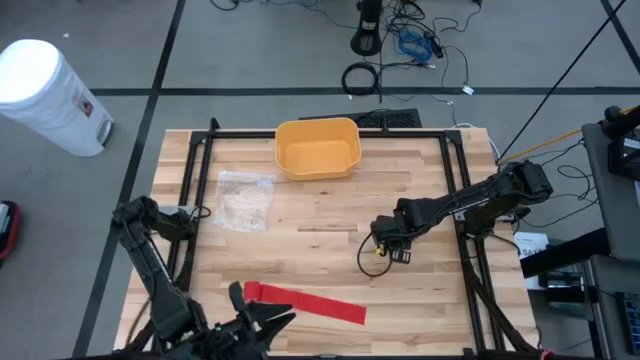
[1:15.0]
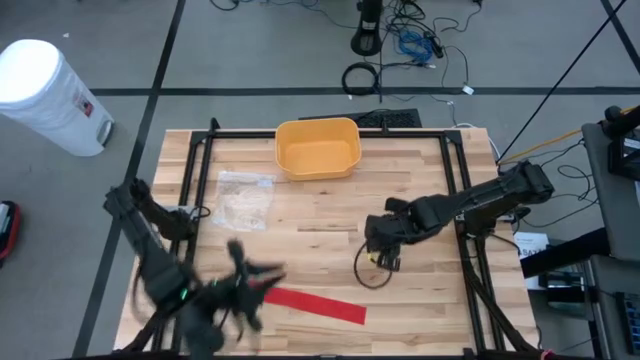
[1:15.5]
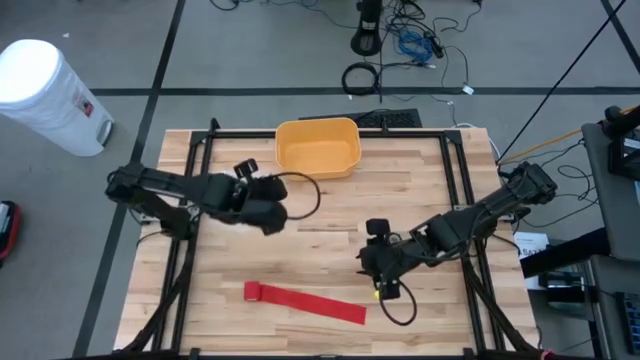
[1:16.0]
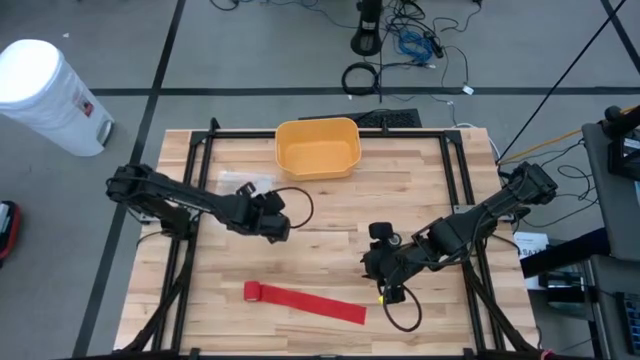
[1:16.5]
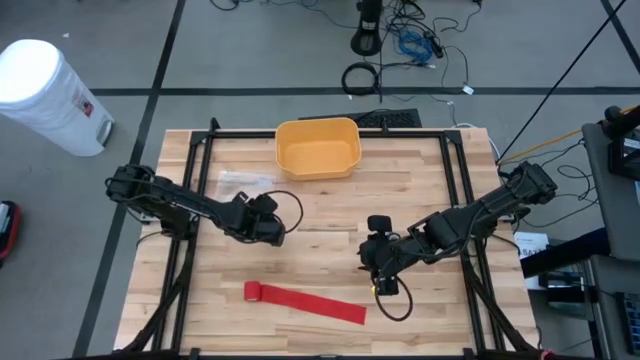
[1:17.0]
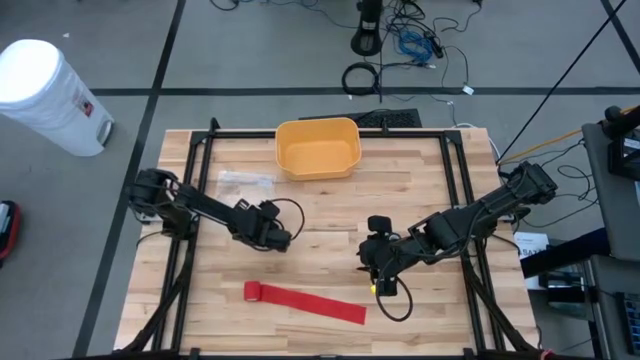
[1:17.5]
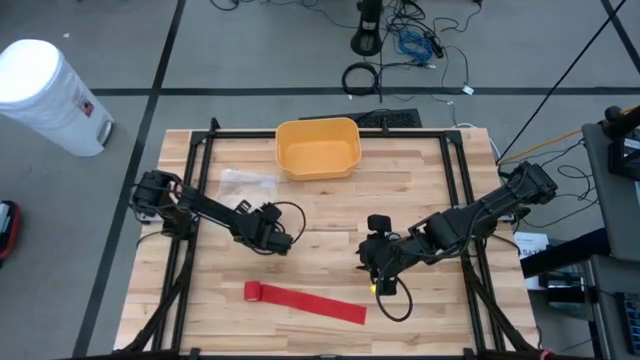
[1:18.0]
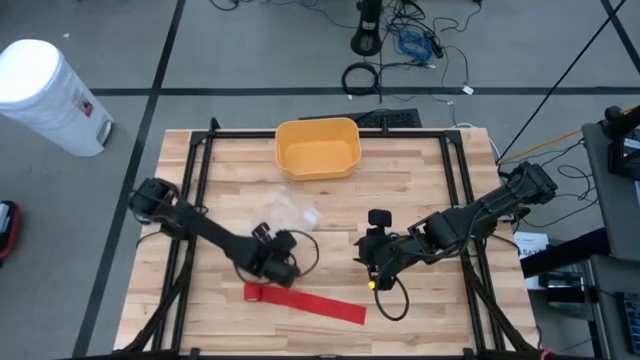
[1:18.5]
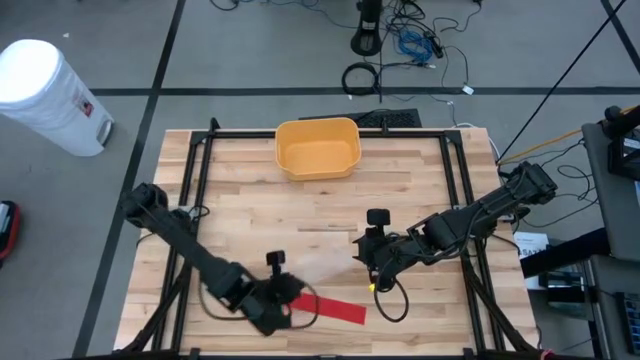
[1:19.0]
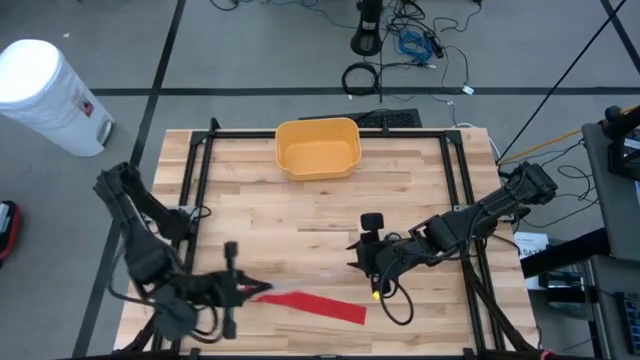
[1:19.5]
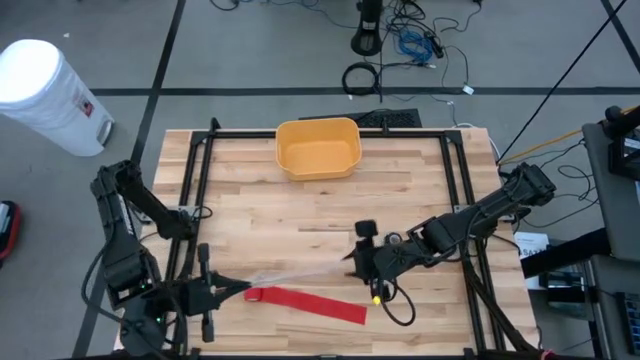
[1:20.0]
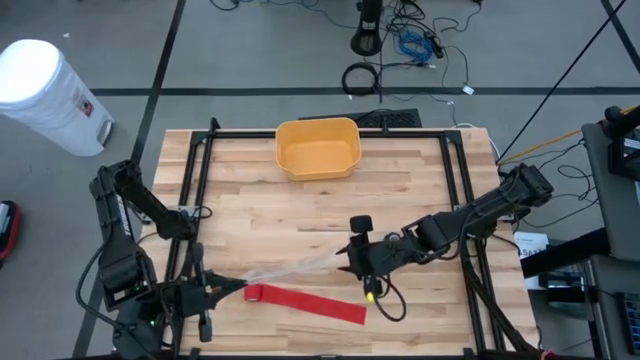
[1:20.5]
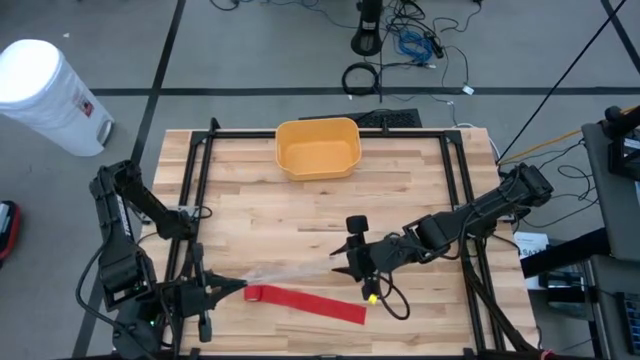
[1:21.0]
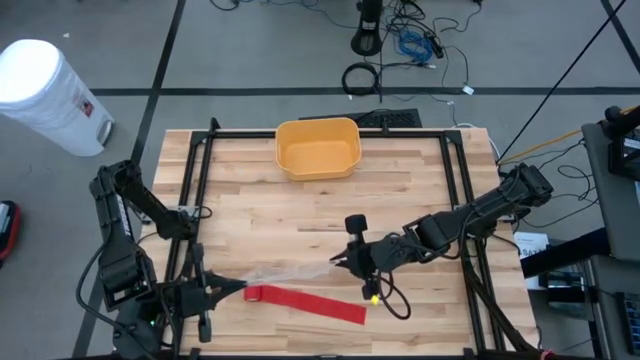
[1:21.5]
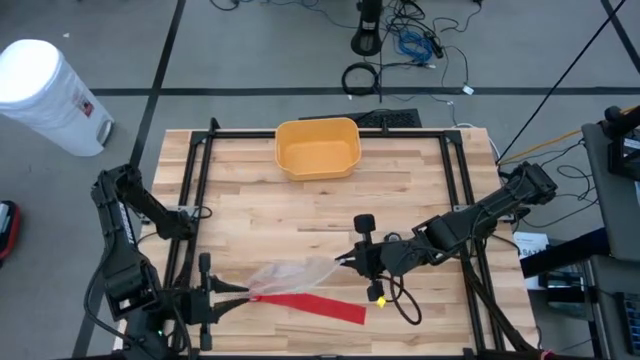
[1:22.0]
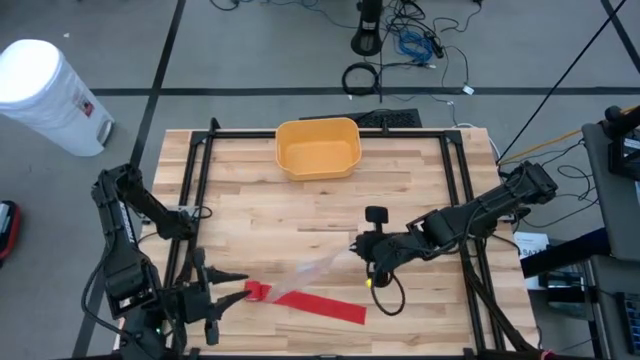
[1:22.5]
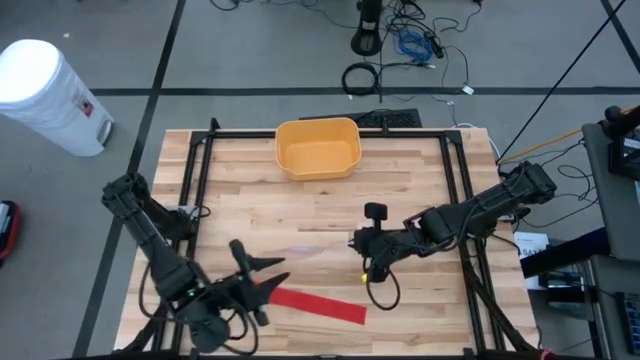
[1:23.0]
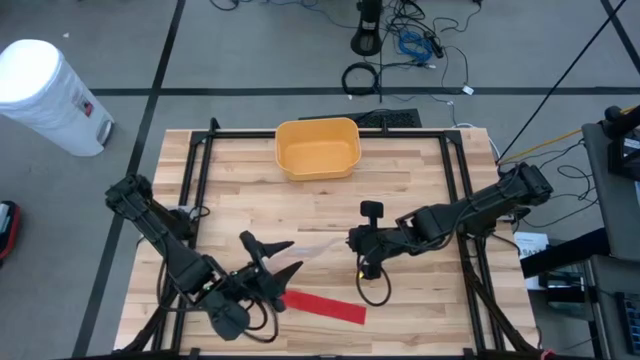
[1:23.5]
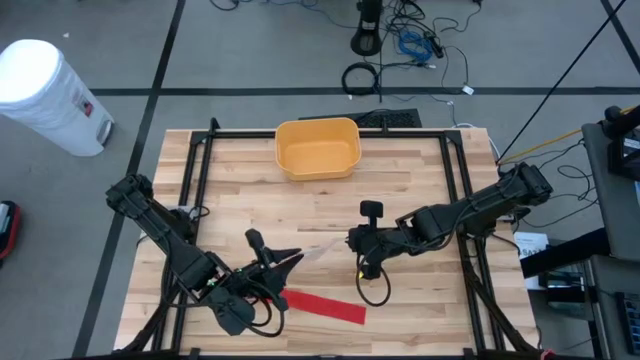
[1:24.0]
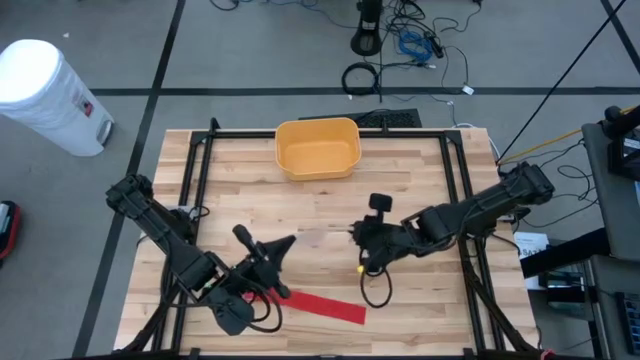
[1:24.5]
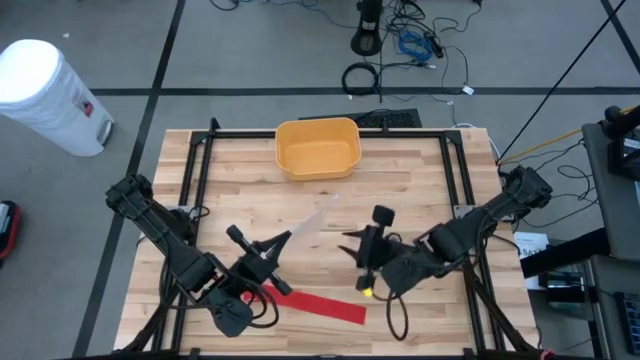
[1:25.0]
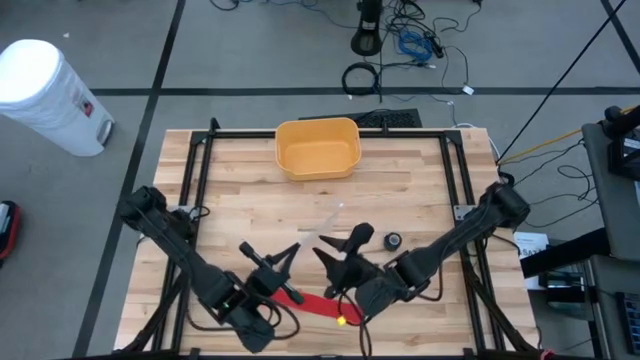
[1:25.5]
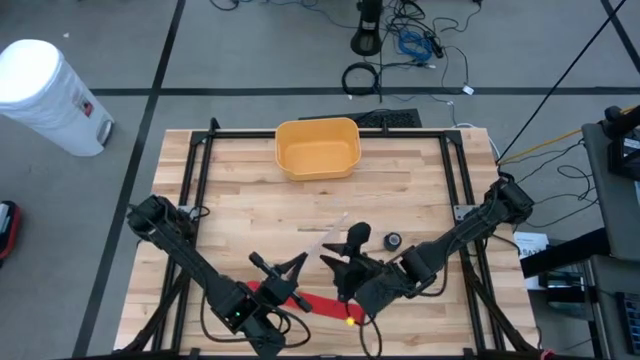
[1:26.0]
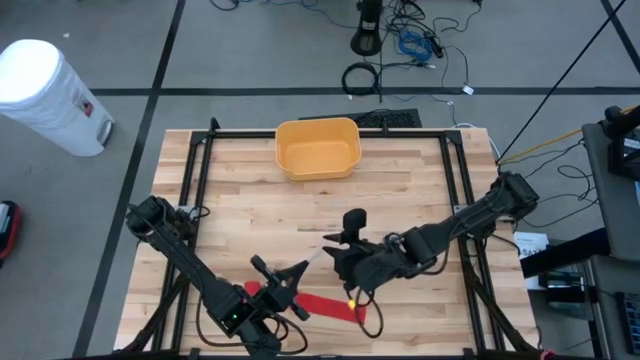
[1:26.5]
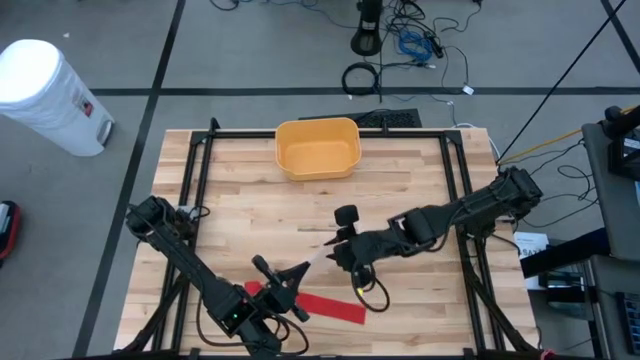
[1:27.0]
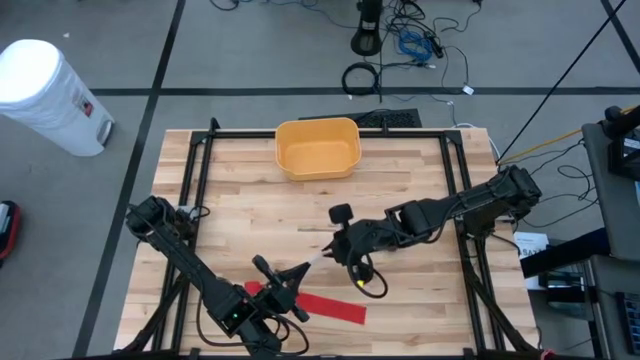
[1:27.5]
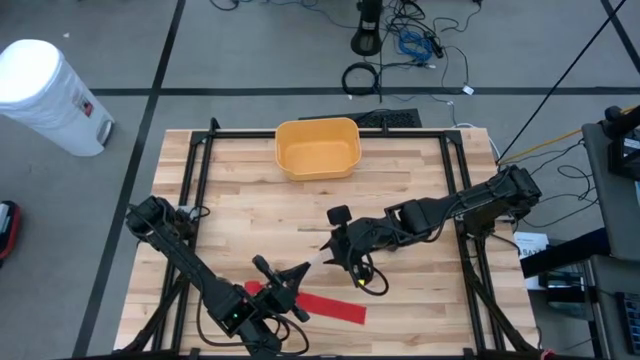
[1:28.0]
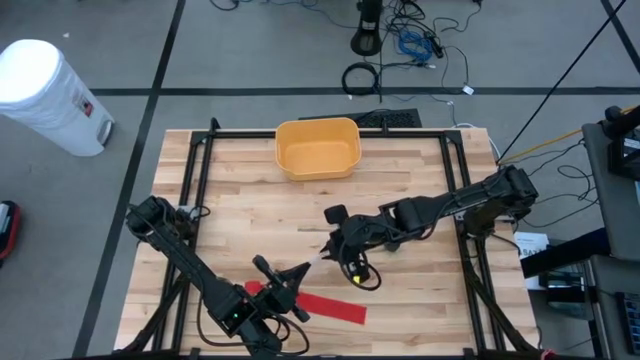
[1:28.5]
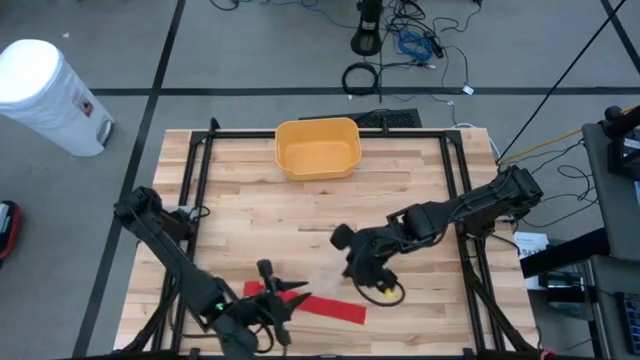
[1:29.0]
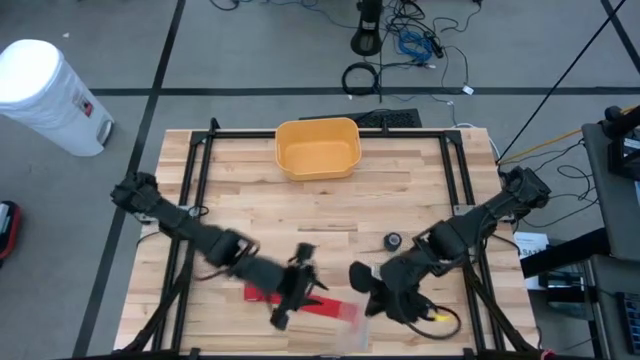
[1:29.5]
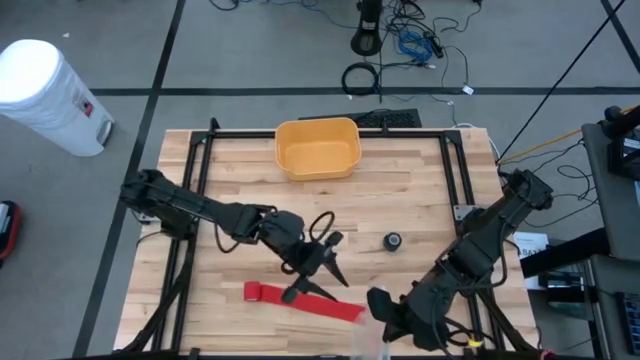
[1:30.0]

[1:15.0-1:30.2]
Task: Roll bandage
Open the transparent zip bag

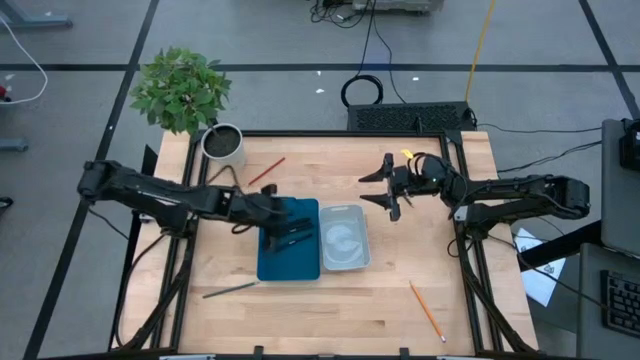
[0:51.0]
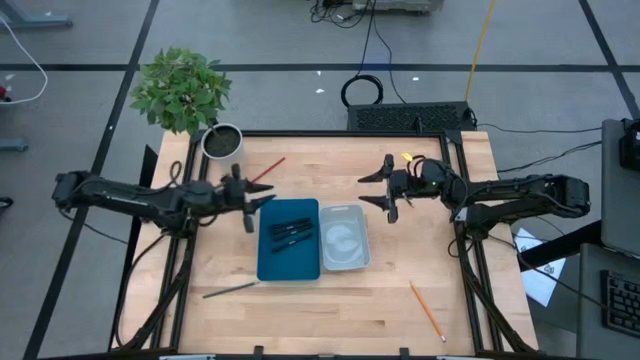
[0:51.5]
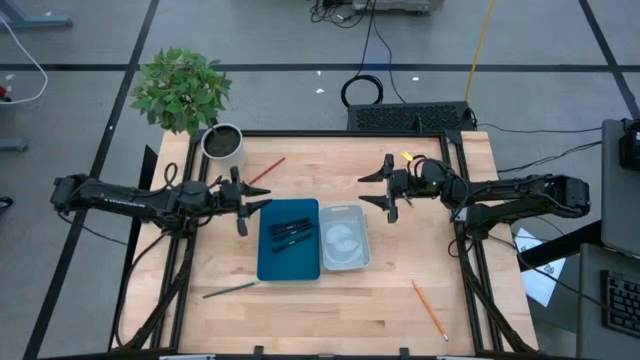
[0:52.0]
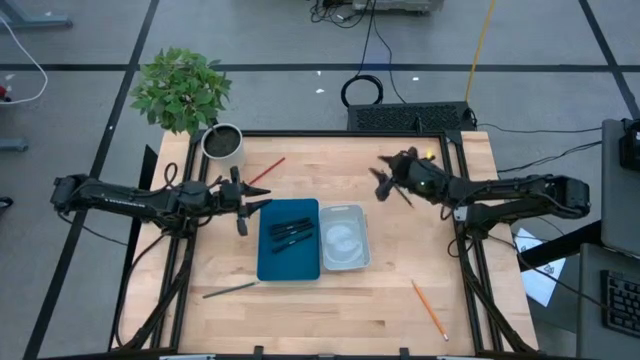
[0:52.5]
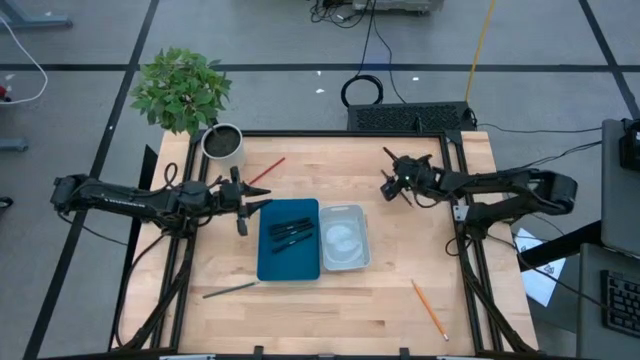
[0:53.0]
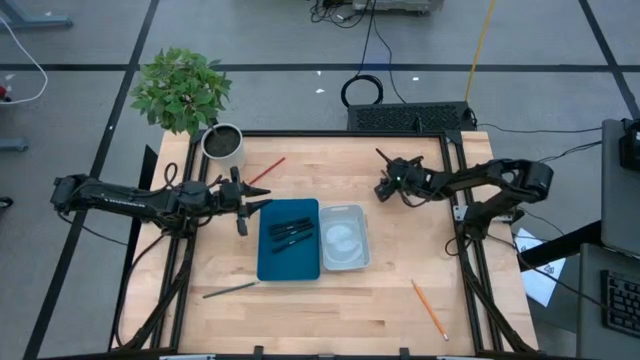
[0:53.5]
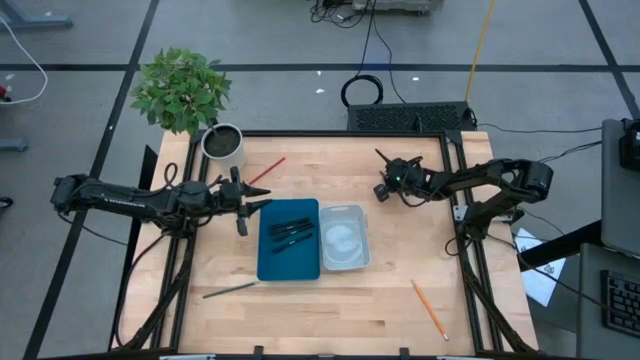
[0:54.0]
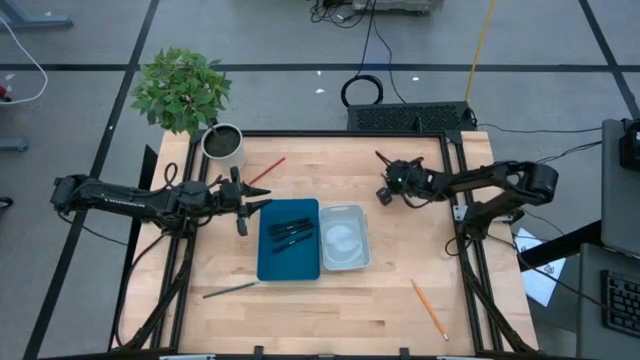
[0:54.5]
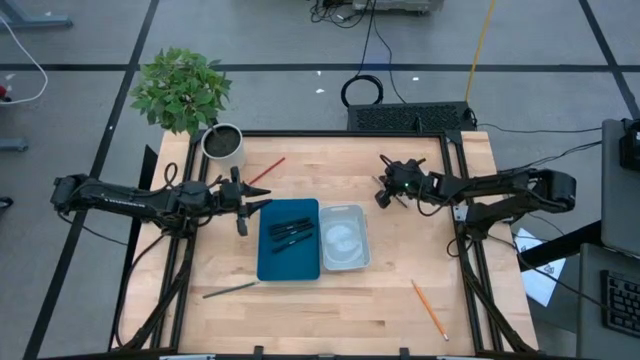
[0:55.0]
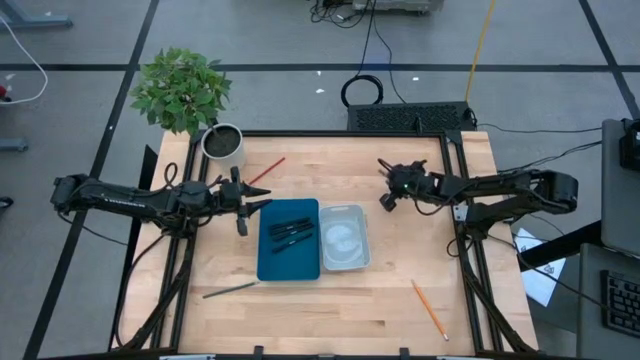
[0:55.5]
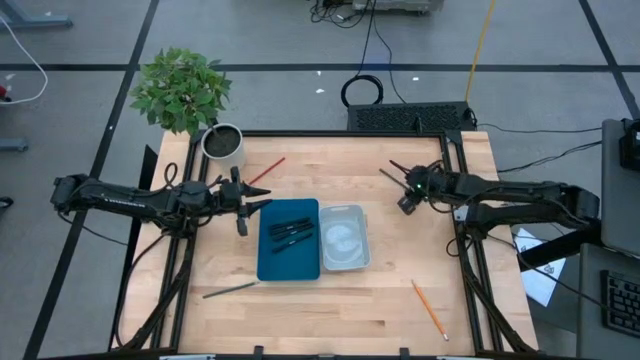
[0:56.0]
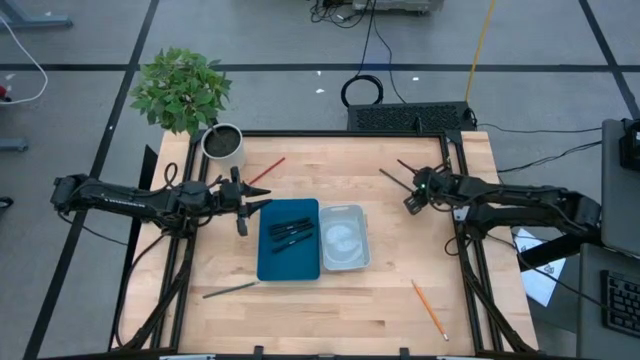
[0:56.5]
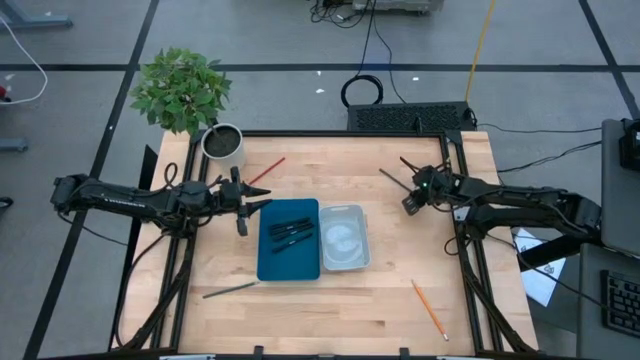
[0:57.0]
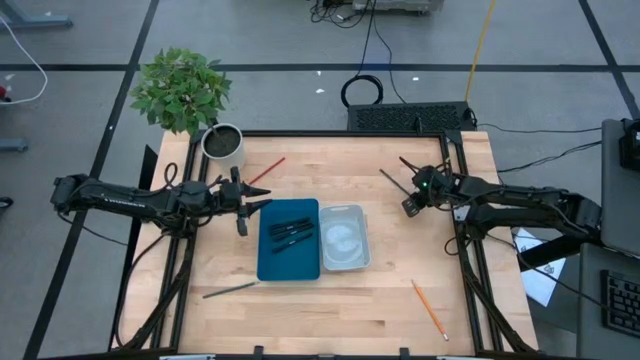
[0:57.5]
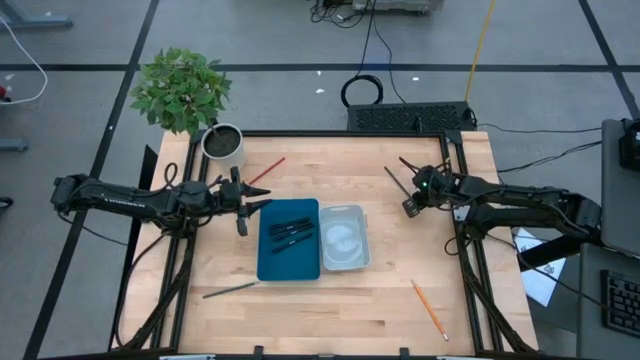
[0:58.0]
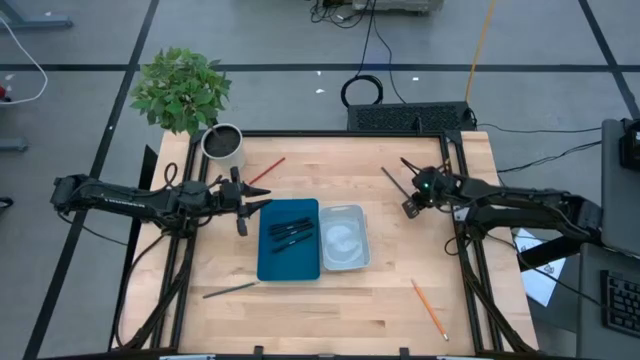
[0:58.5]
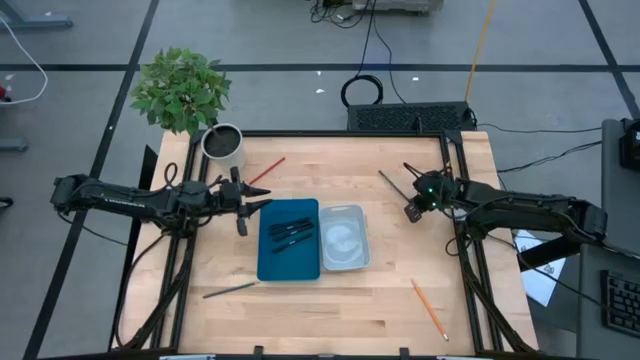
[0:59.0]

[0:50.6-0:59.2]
Task: Sort pens & pencils
Put the top green colored pencil into the white bin
